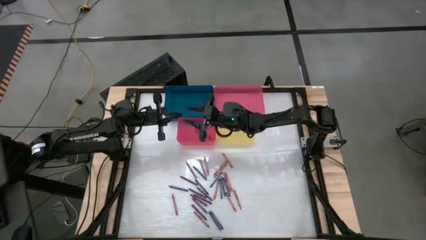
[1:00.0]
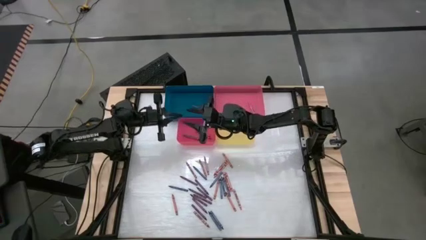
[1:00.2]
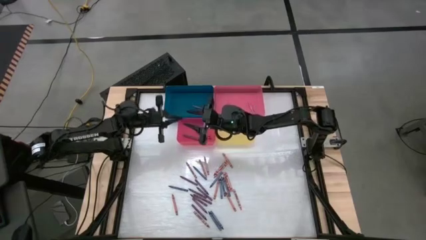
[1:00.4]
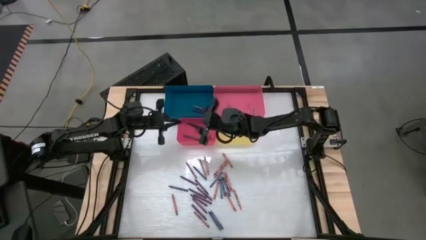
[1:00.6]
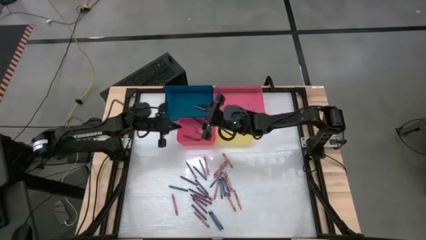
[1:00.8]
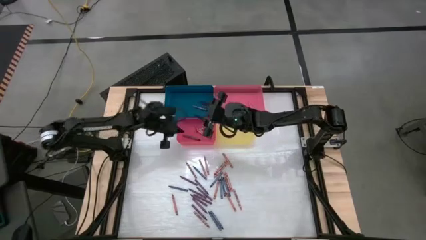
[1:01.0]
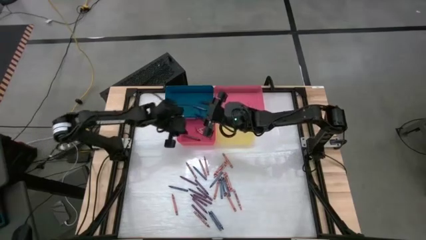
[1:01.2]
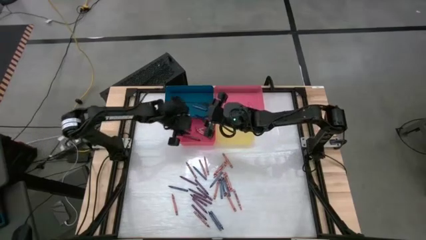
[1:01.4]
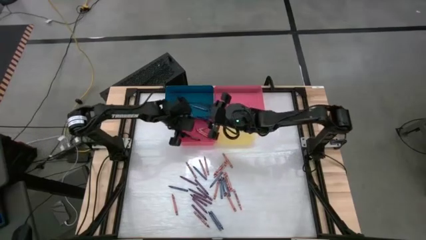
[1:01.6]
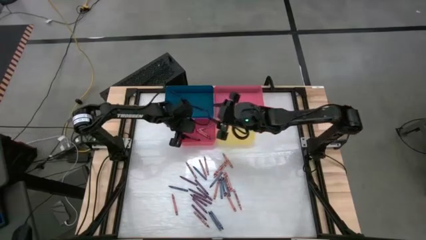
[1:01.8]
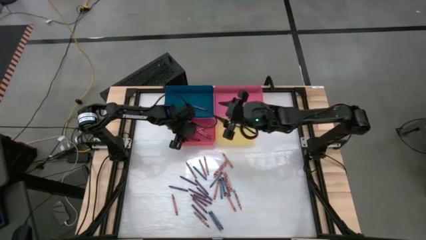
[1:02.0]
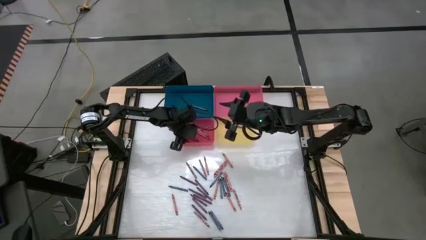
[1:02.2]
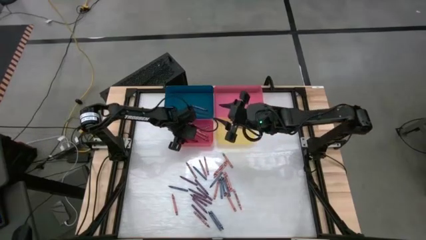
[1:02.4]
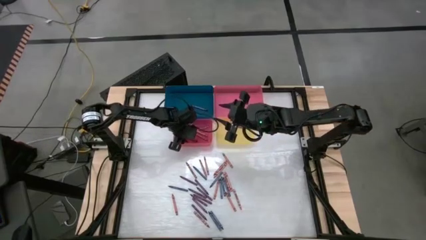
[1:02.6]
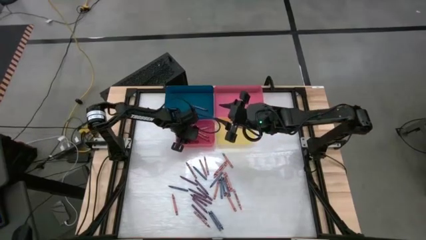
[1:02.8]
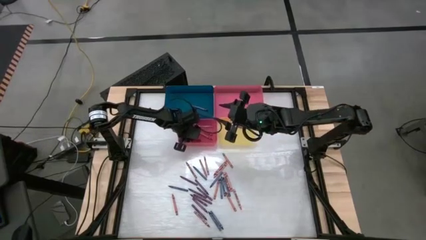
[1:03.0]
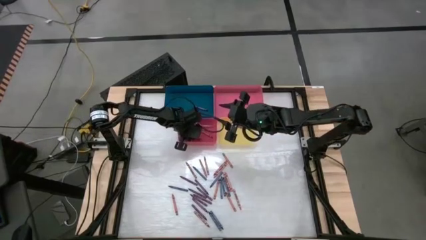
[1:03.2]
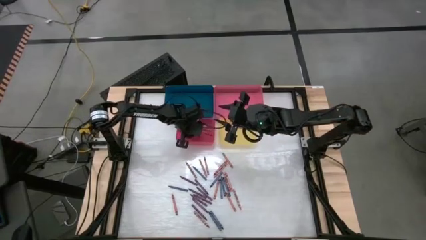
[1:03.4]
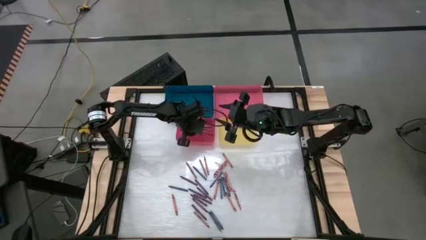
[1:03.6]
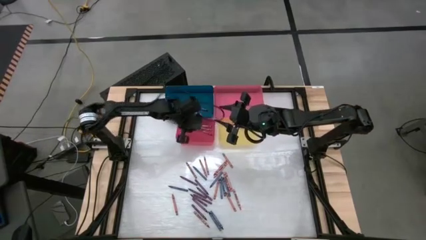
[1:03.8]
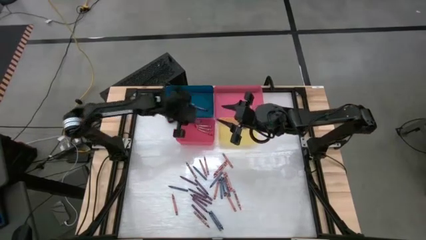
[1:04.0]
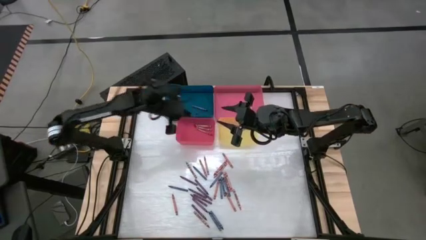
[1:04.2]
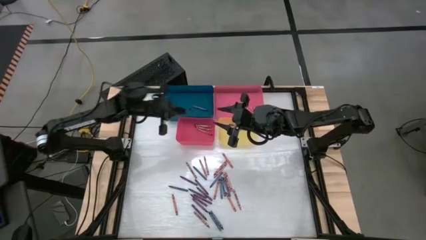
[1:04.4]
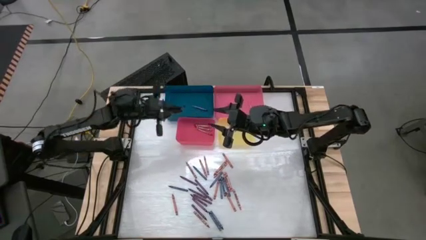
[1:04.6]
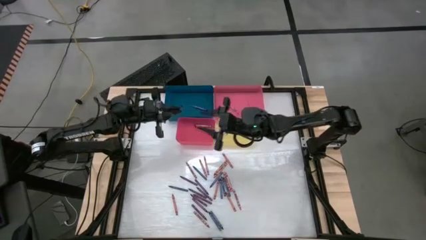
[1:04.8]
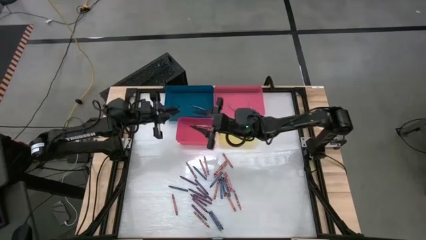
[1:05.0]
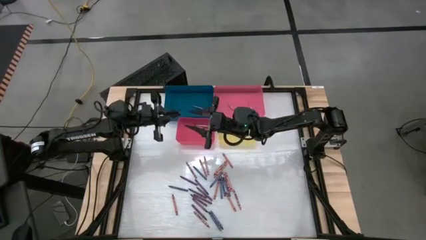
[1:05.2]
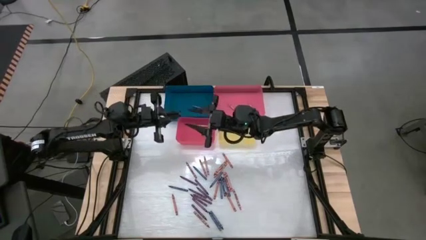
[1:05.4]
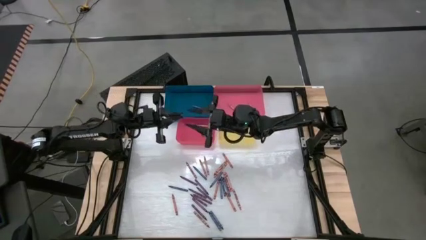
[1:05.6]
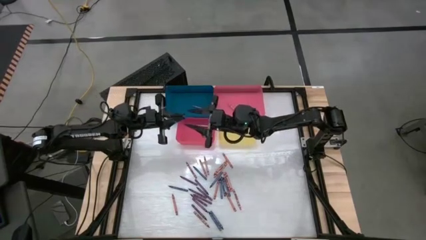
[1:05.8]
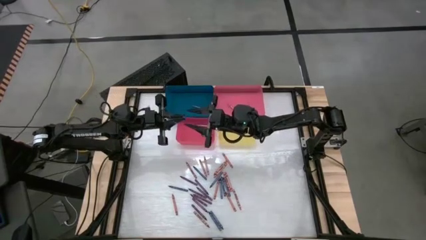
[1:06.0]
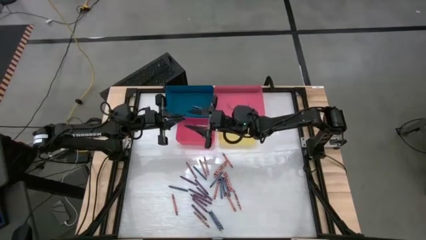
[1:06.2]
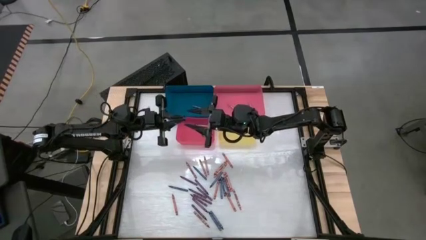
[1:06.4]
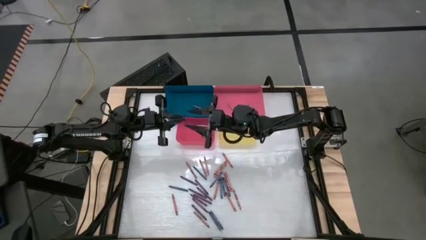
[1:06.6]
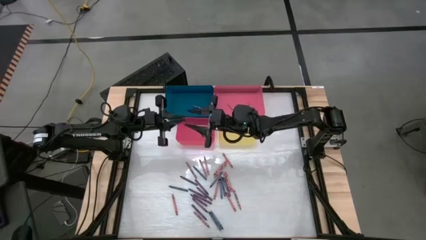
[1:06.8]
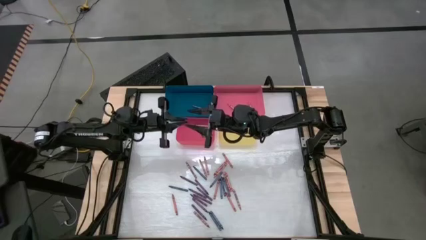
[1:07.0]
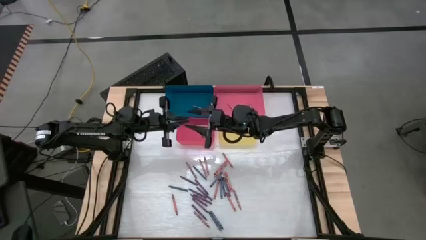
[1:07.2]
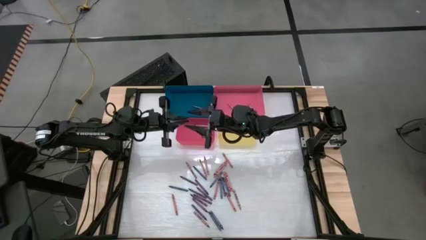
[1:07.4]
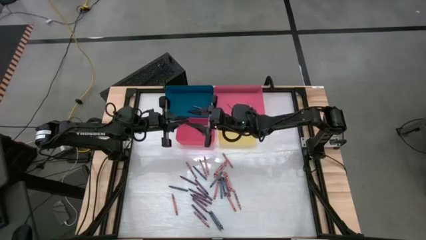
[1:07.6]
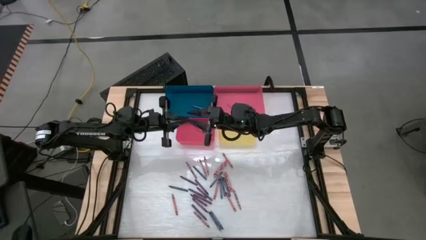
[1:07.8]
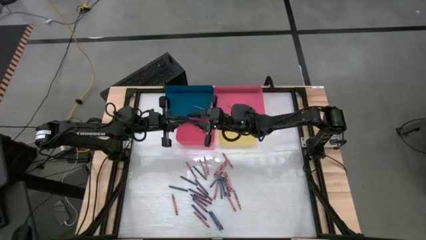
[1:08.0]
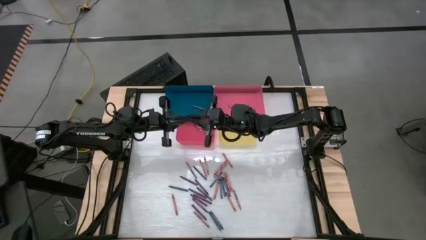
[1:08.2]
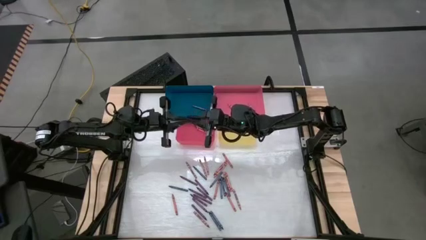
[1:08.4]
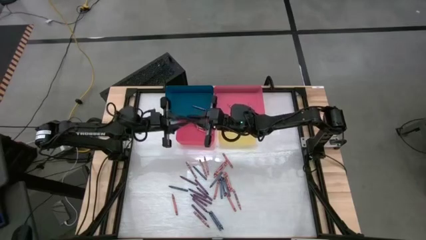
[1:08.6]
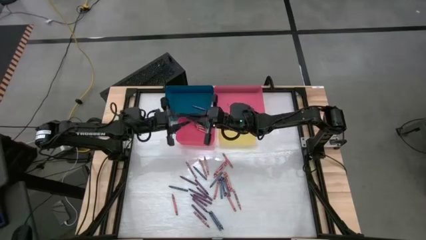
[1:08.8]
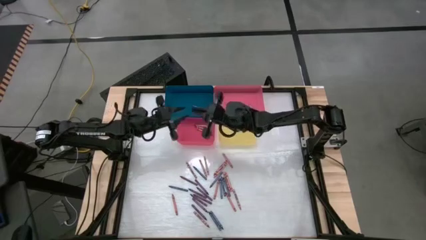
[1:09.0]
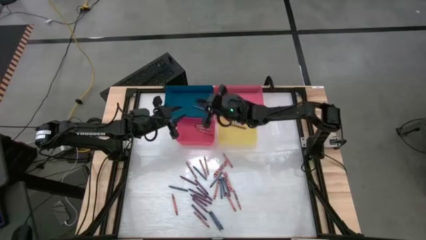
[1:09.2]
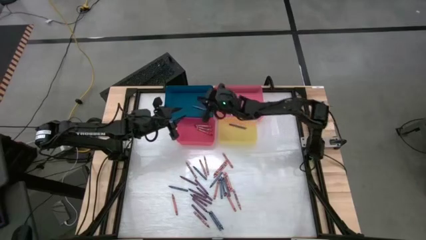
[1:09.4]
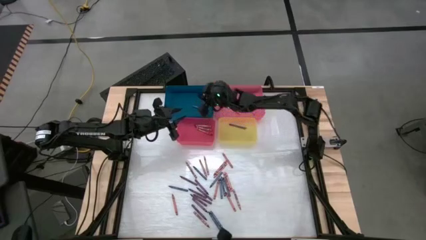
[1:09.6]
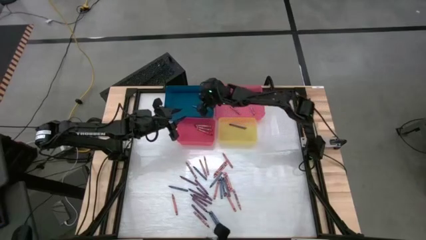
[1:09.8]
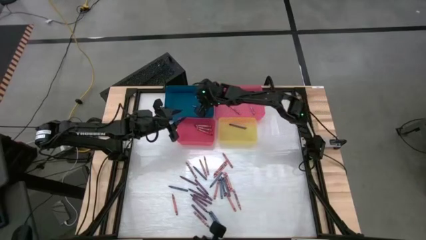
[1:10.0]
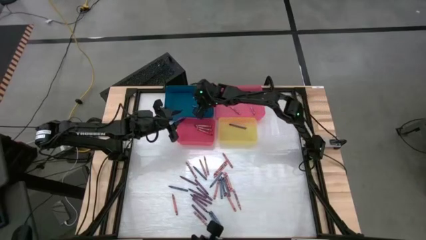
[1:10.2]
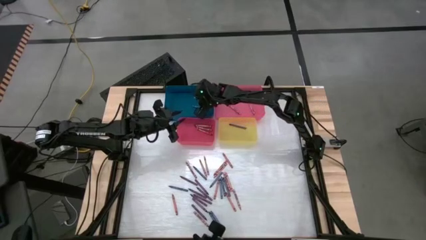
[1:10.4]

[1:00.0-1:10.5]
Task: Sort crayons
Put the blue crayon into the blue bin
